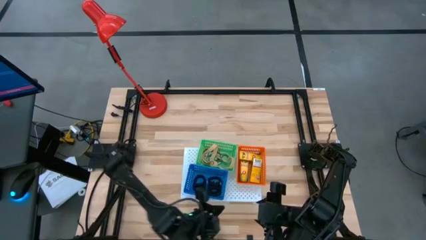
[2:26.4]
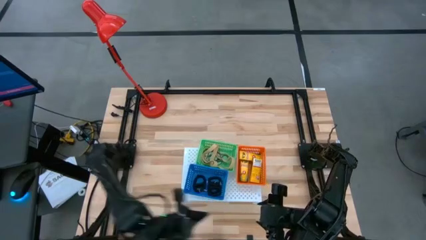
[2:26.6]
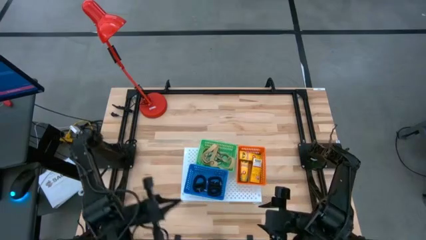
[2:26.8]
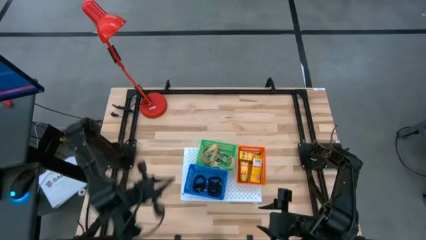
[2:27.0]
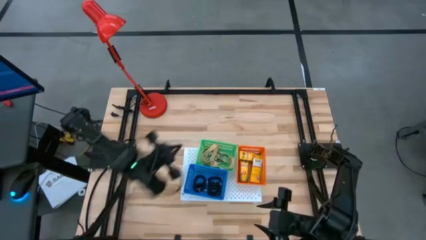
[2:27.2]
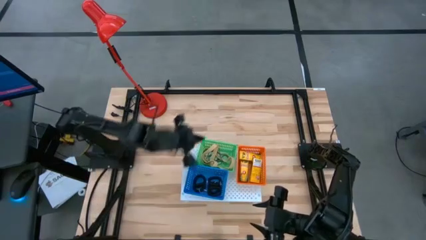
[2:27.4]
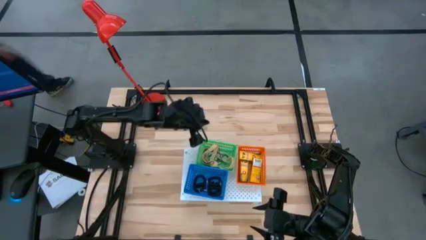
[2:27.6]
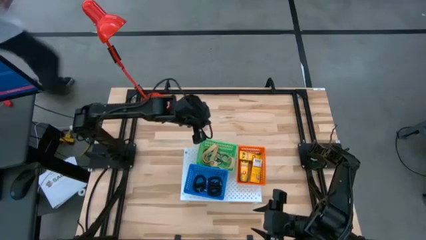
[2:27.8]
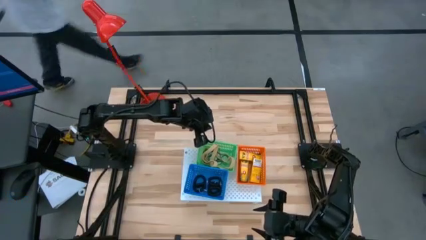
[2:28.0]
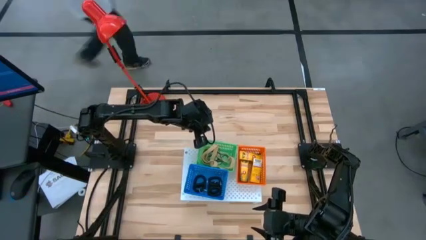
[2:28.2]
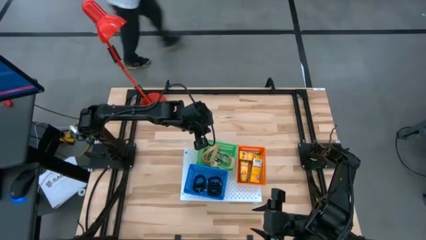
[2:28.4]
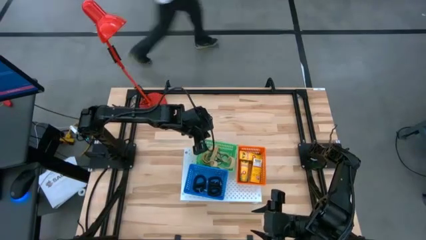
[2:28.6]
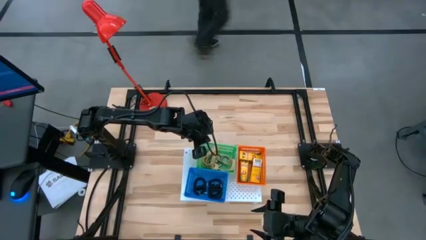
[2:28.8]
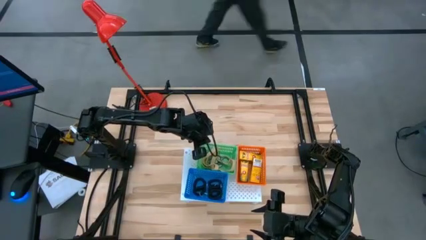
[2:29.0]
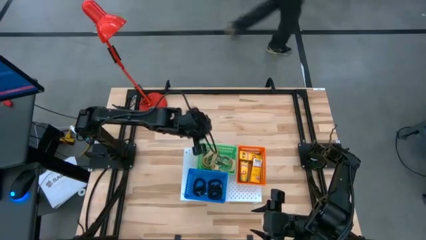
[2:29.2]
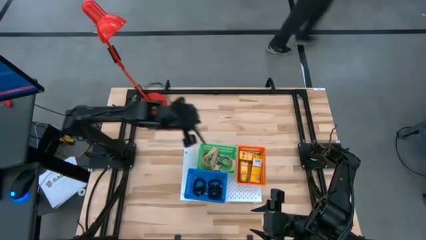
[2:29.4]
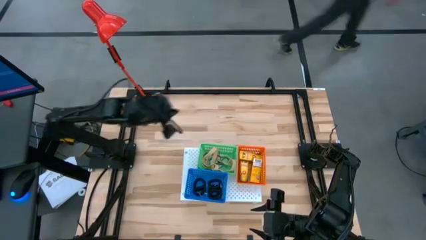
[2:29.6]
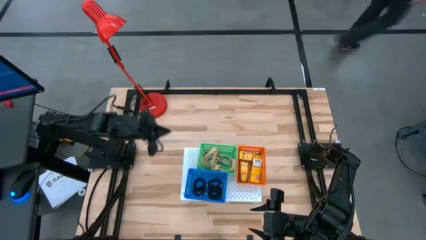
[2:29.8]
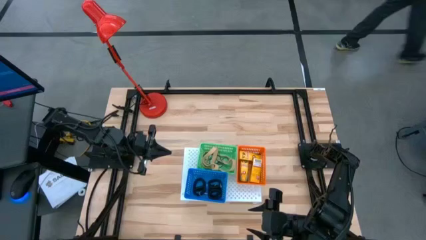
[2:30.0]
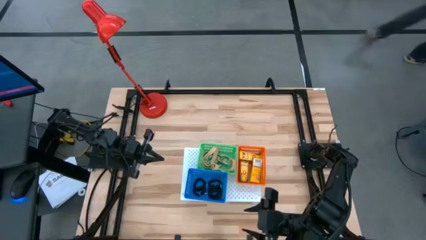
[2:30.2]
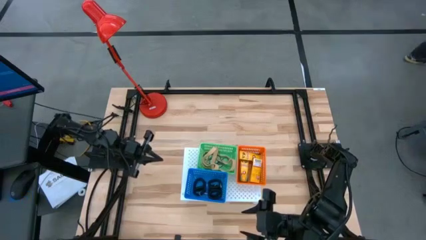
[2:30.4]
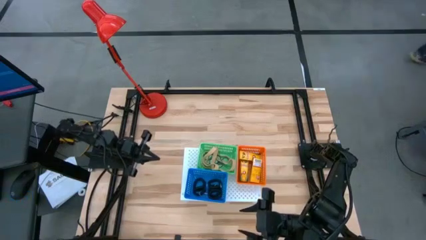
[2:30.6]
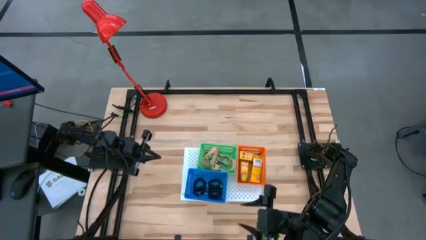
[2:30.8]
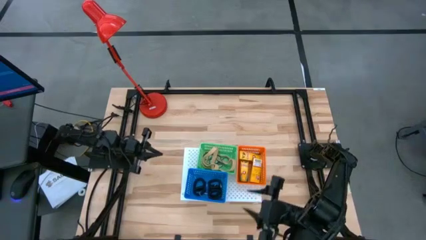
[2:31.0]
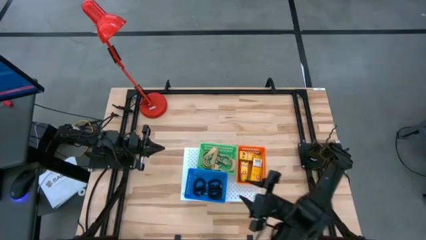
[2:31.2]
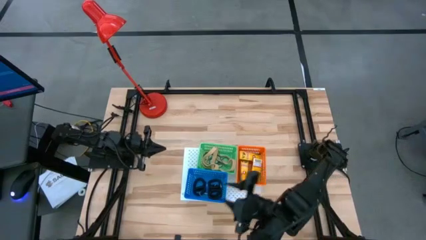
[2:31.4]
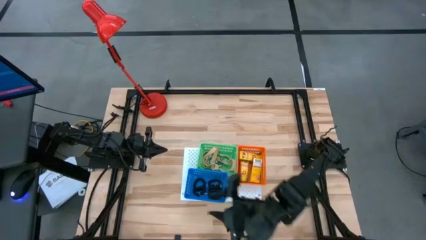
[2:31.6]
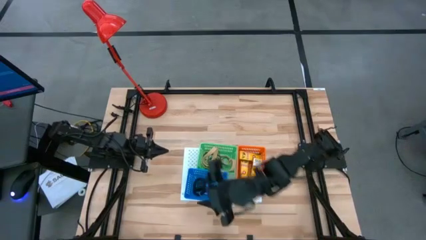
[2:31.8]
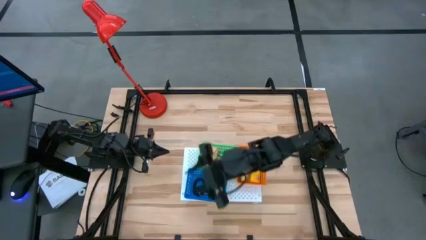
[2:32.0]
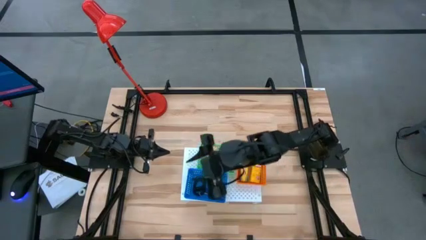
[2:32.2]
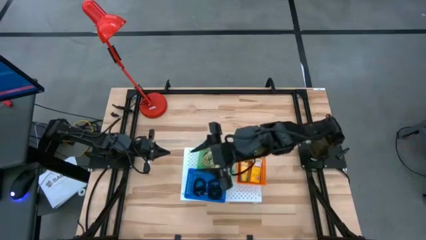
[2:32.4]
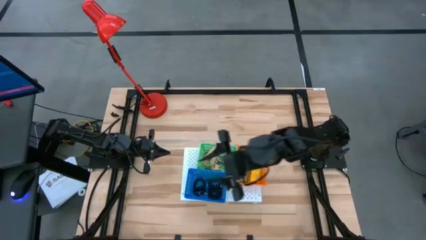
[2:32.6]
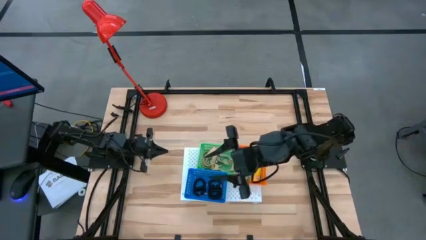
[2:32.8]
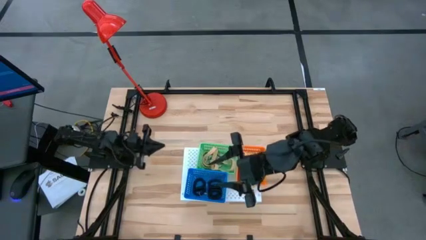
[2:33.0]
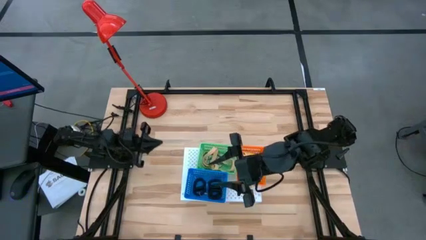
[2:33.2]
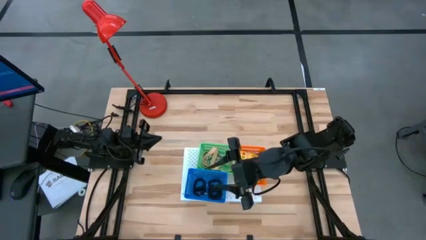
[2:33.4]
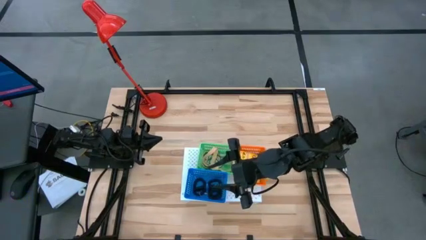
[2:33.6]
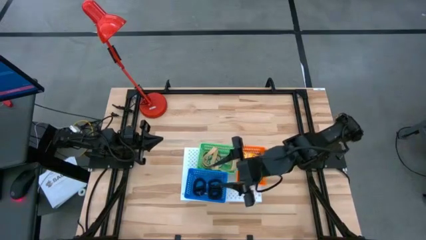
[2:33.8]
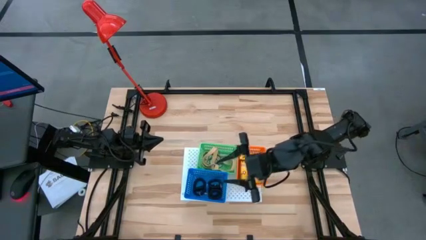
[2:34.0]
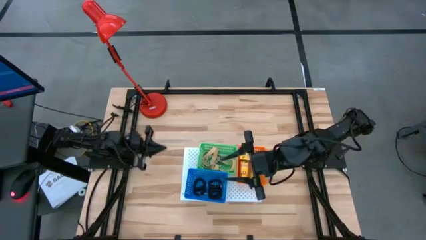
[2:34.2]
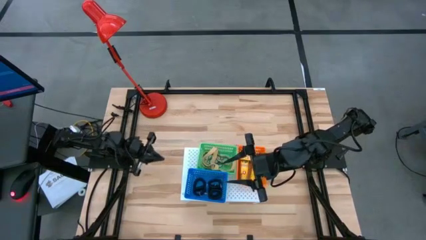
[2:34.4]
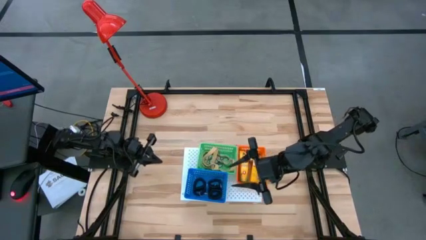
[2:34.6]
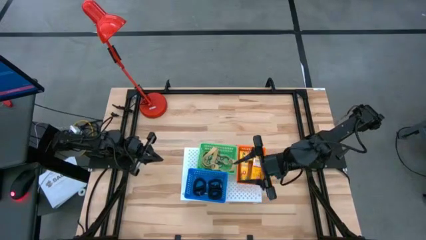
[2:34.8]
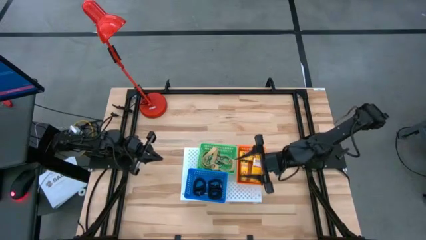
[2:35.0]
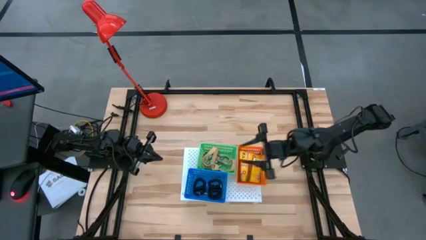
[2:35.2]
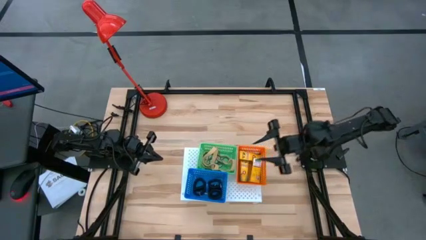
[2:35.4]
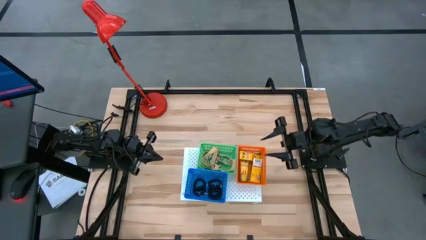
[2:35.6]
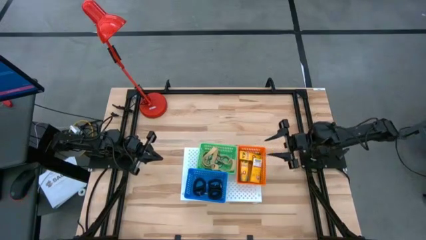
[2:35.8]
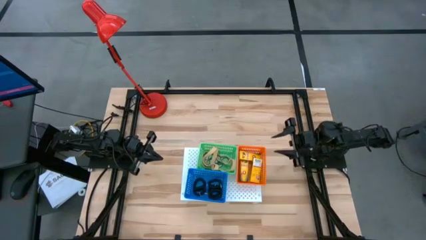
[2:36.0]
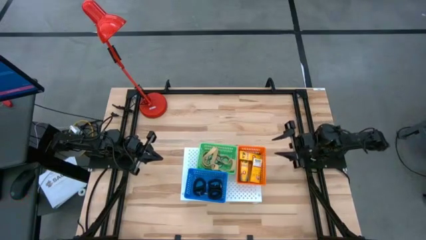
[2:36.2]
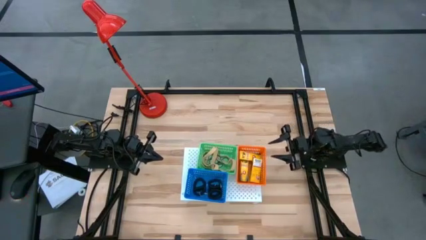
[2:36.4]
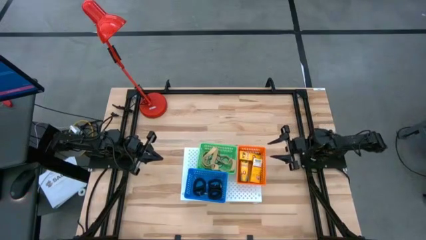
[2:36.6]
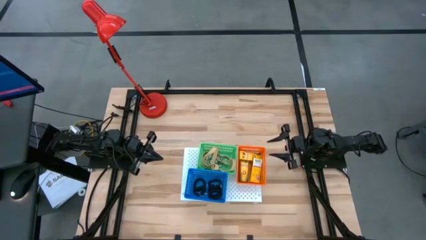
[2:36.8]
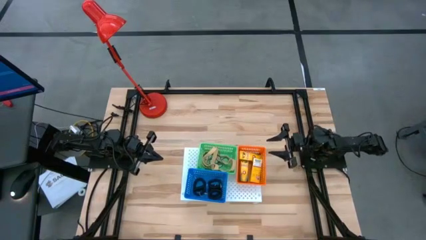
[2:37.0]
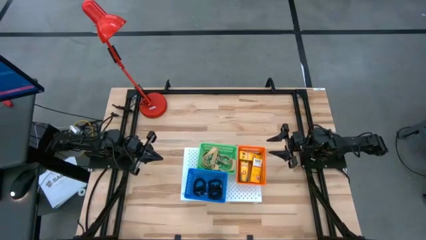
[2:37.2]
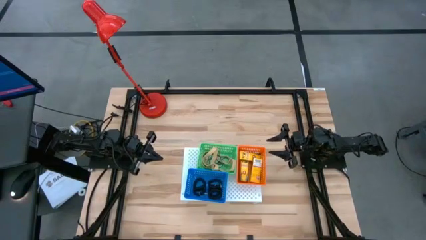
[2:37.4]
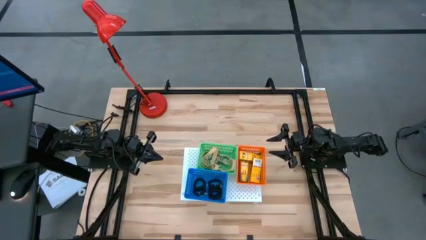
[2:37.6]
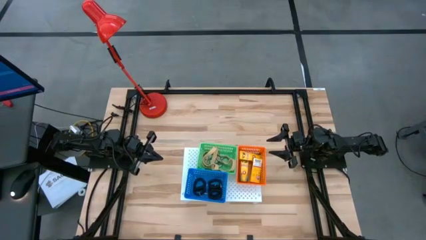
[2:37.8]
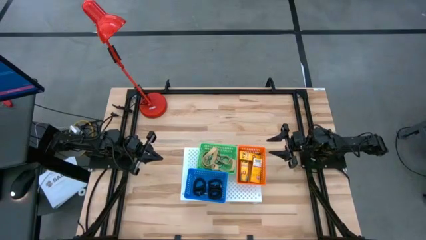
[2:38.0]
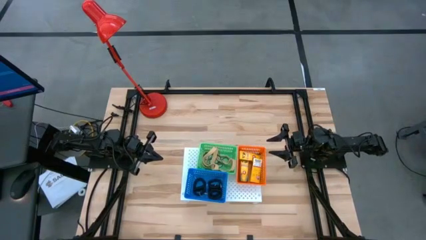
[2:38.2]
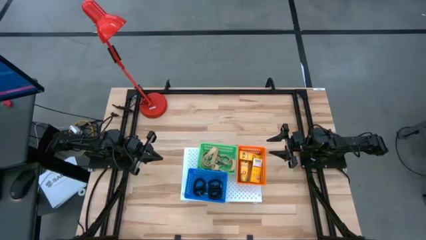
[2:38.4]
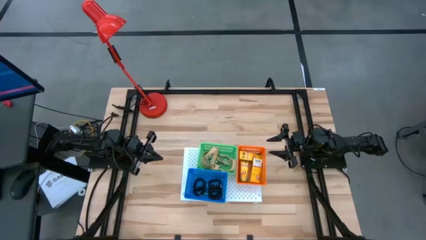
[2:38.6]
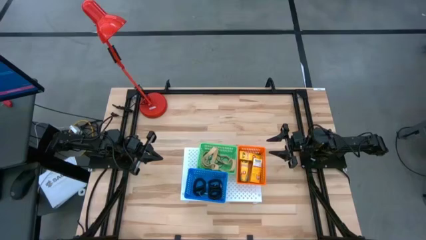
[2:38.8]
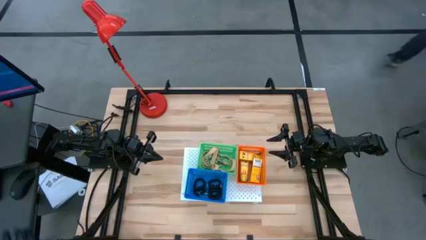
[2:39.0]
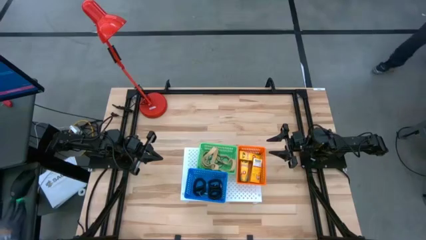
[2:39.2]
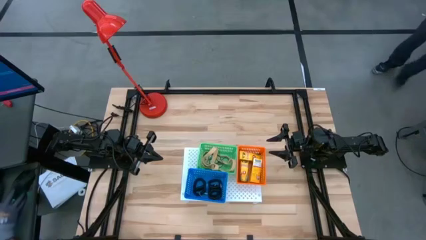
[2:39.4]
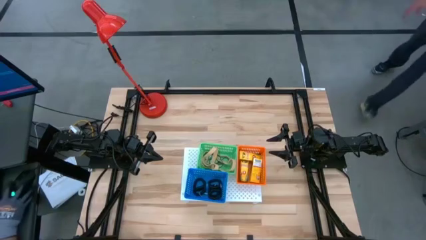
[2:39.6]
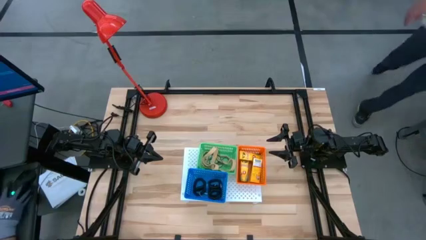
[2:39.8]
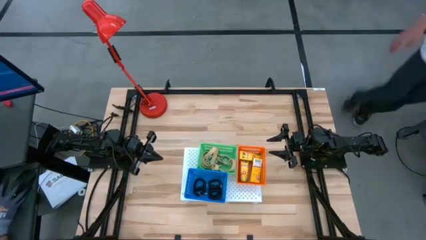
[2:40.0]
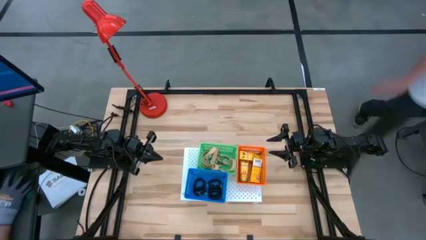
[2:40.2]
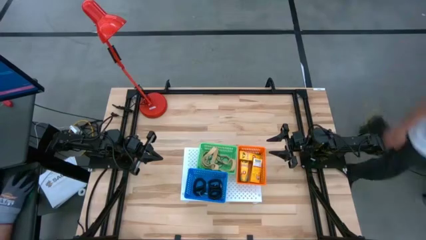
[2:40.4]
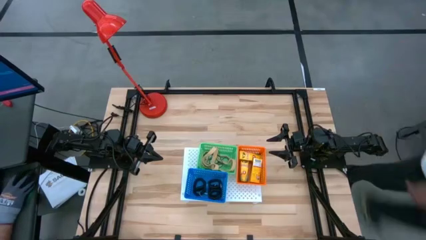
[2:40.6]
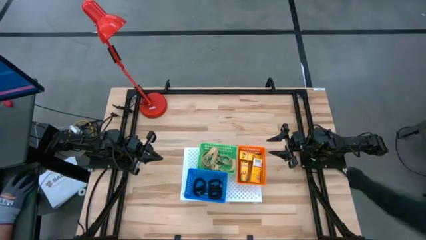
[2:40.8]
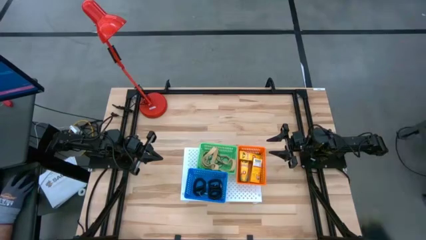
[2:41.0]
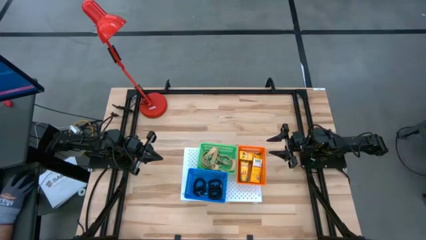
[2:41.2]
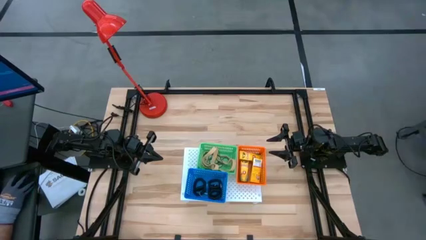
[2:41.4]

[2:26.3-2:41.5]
Task: Pick & Place Office Desk Supplies
Return to Home Position
